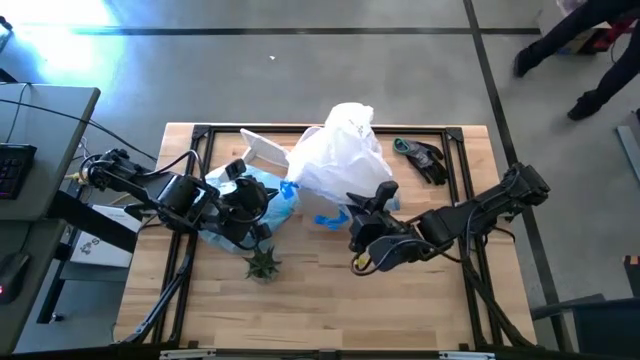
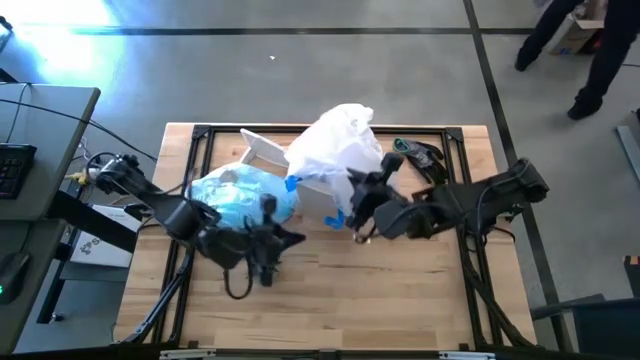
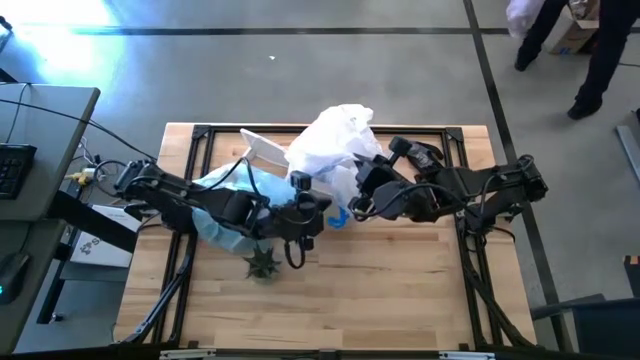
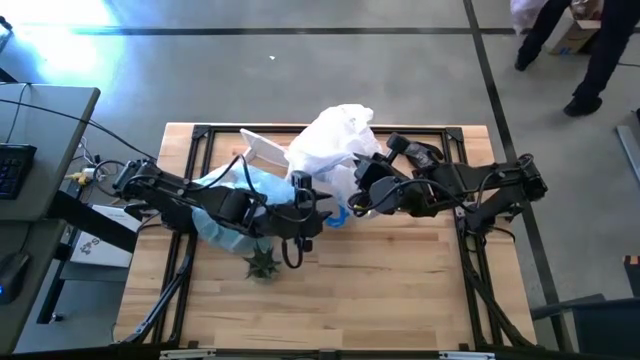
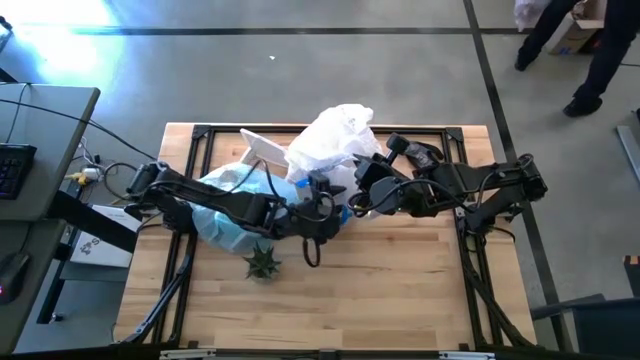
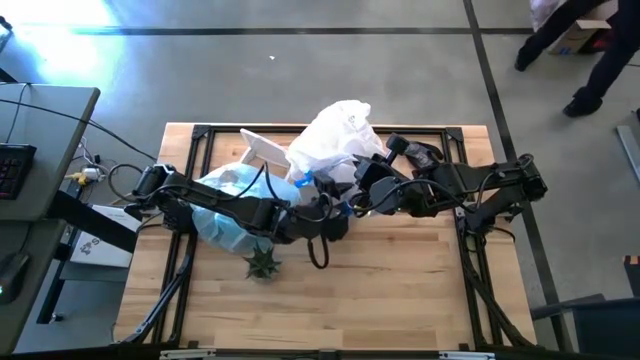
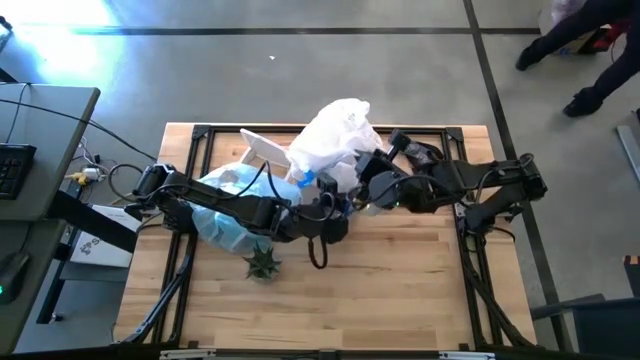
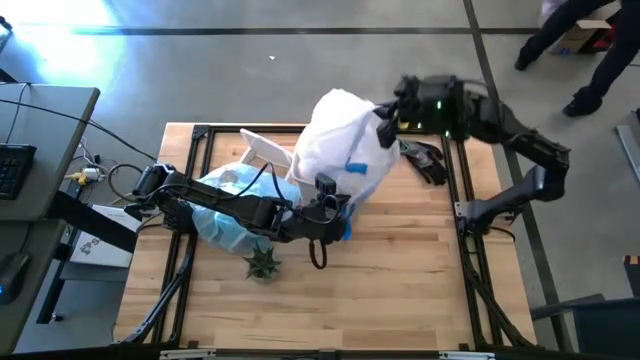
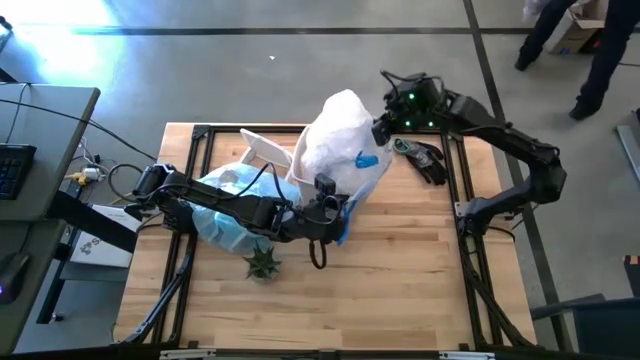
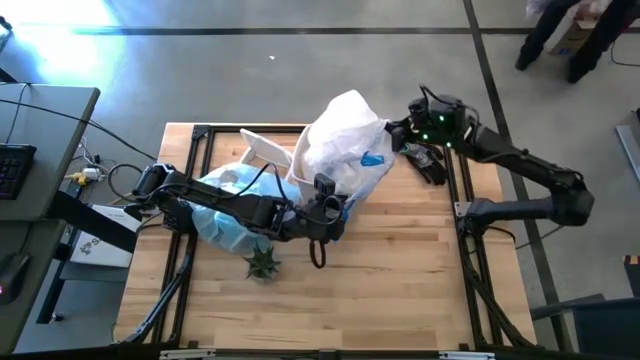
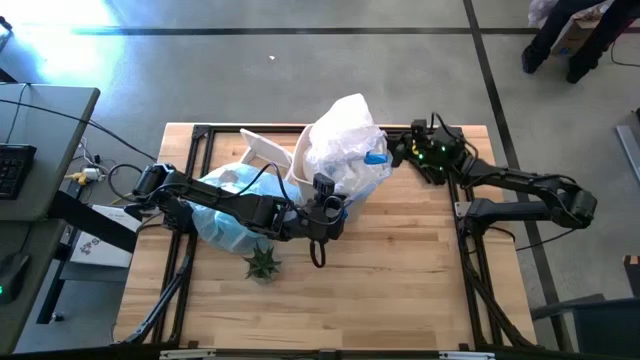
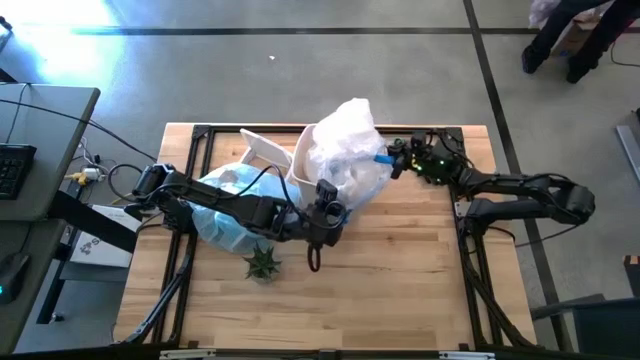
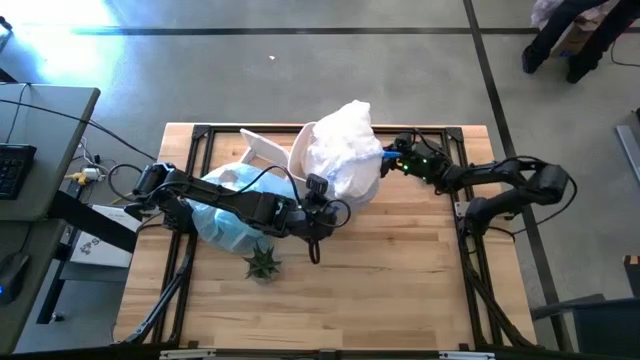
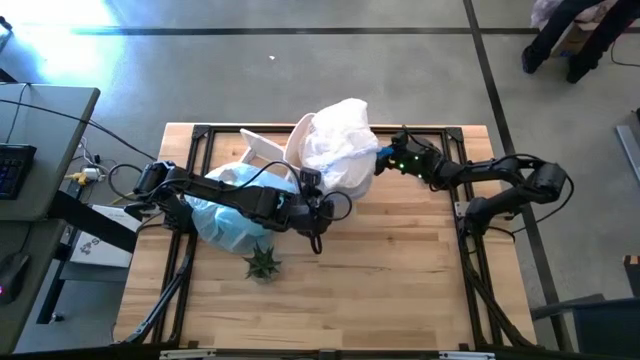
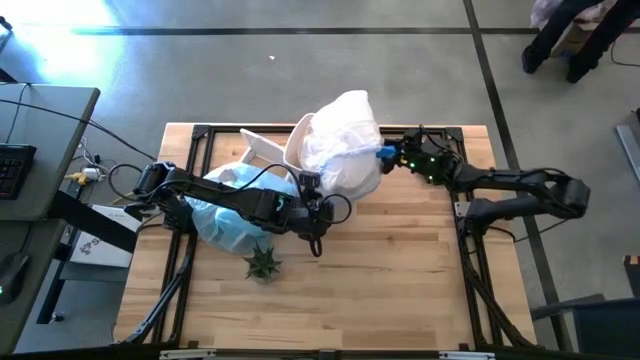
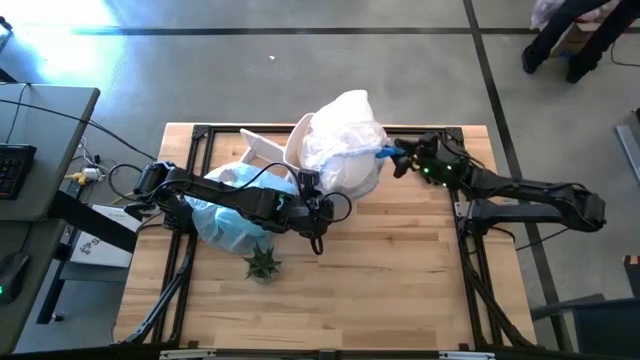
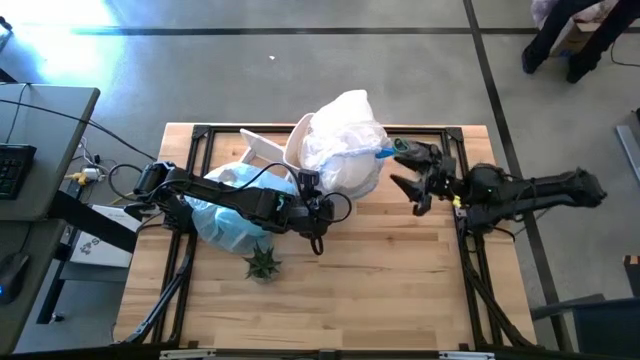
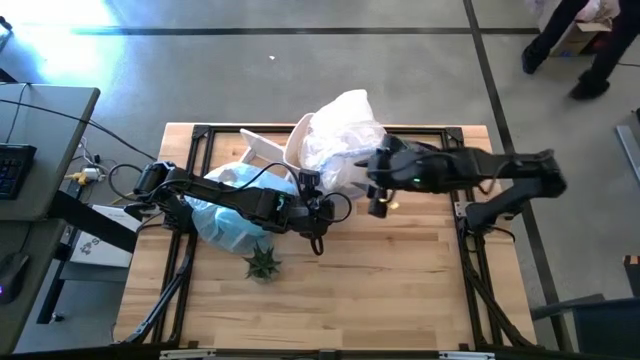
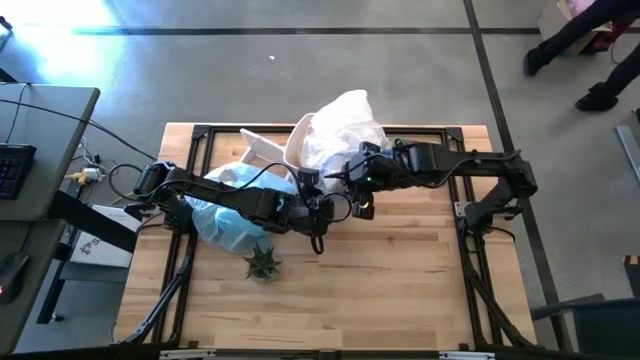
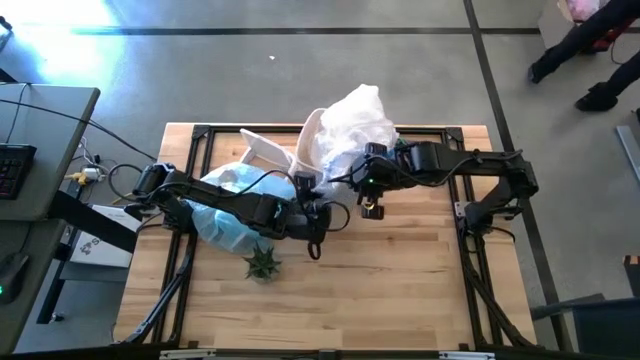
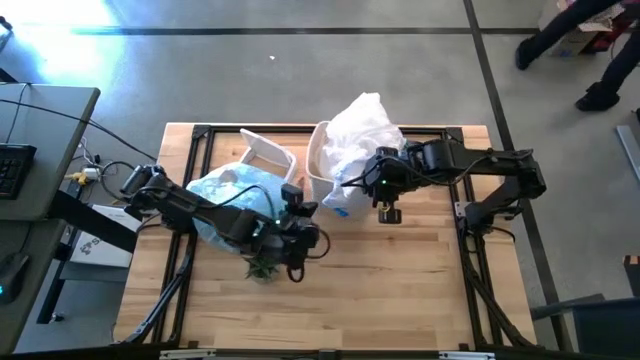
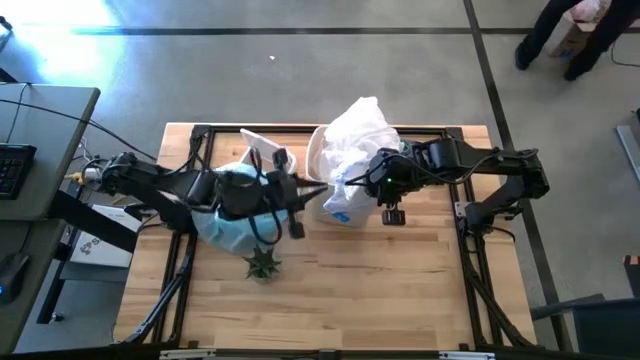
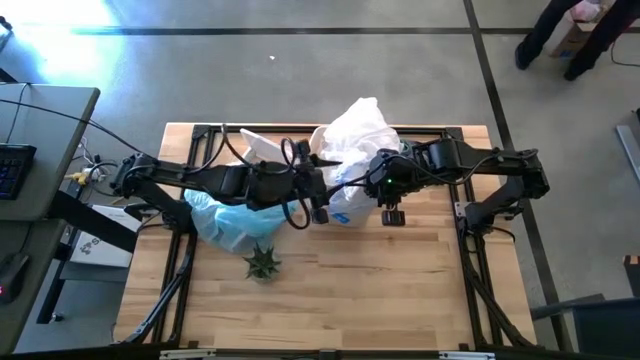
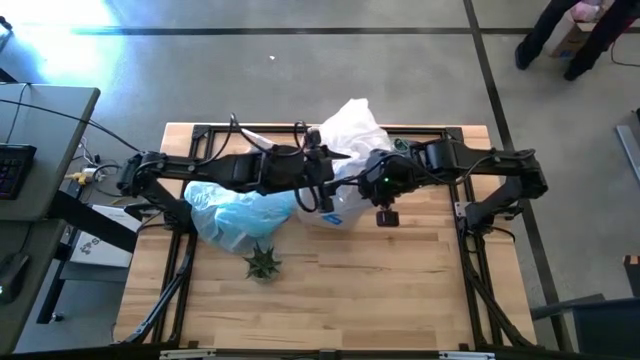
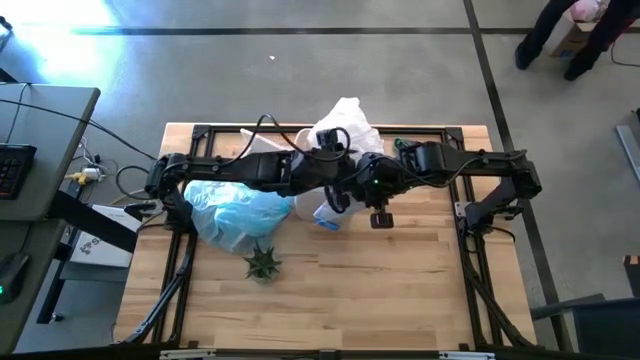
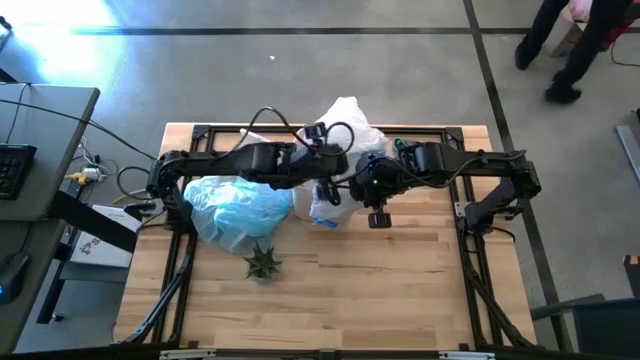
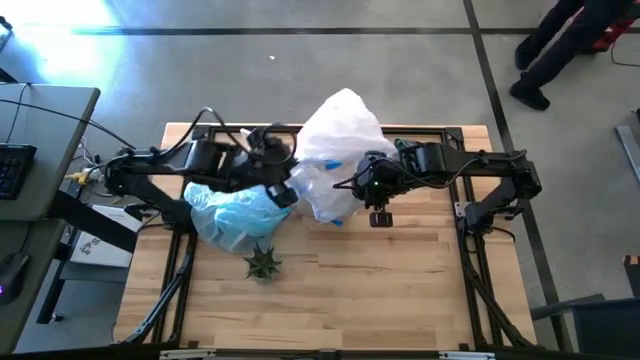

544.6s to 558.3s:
Task: place trash/remove bag and relplace
Insert the new trash bag into the trash bin

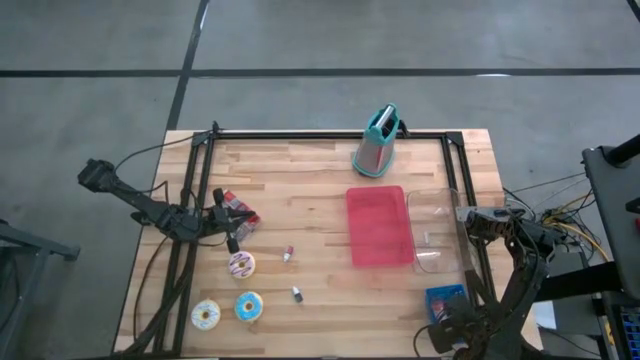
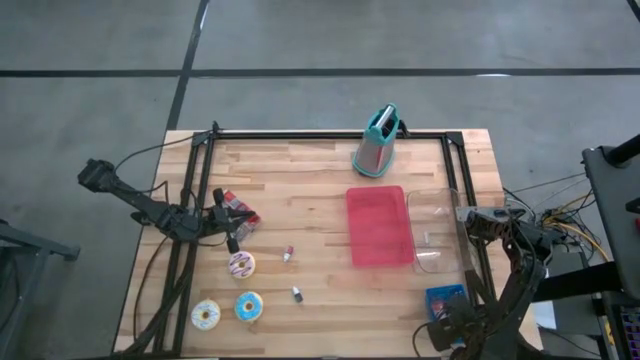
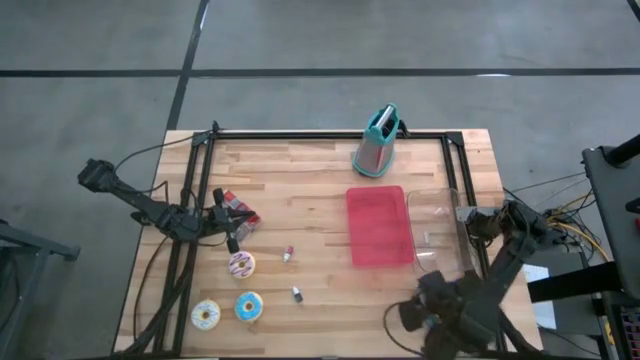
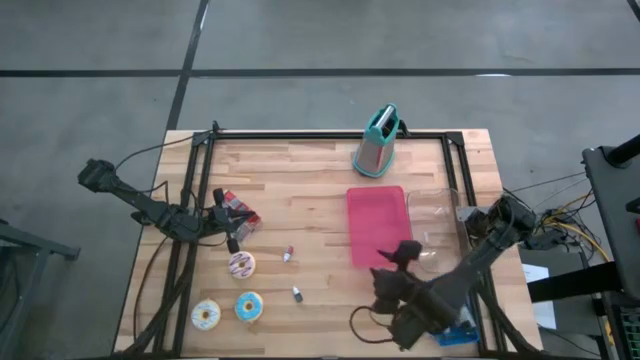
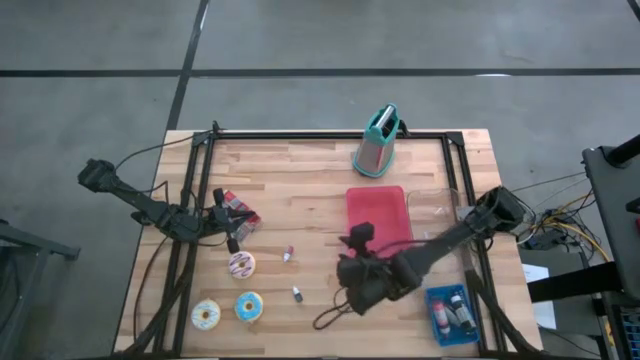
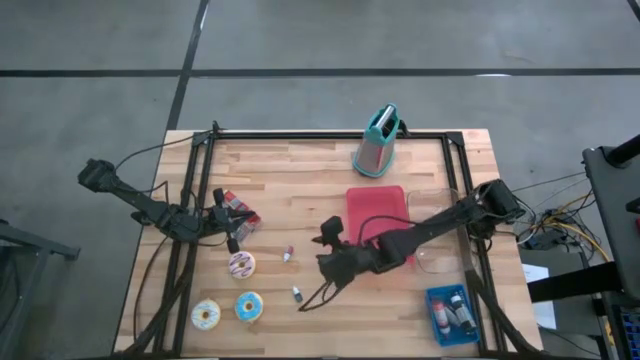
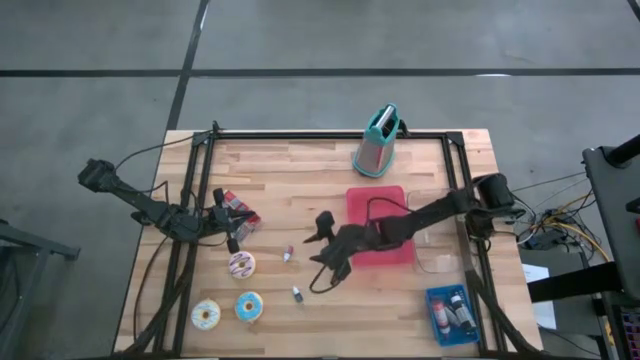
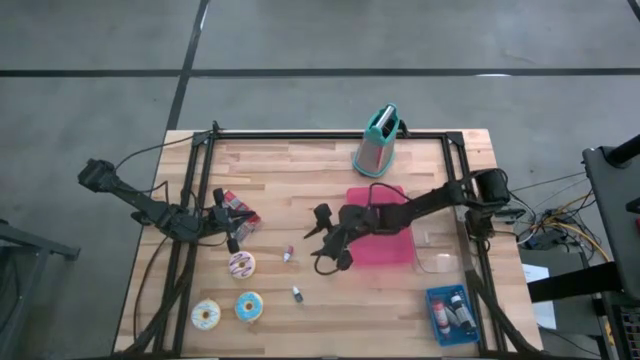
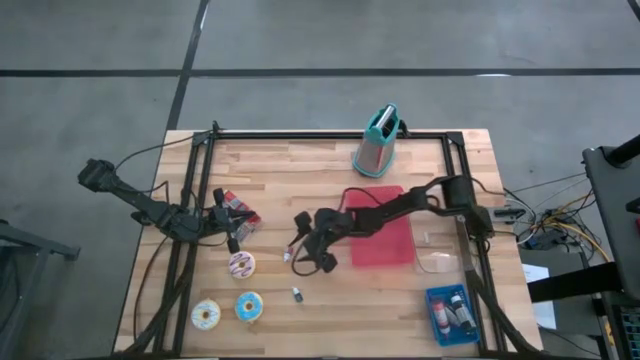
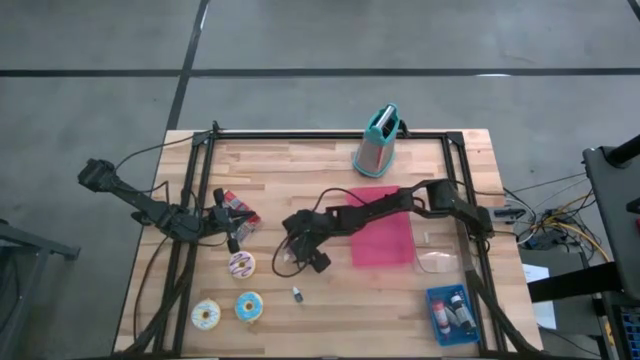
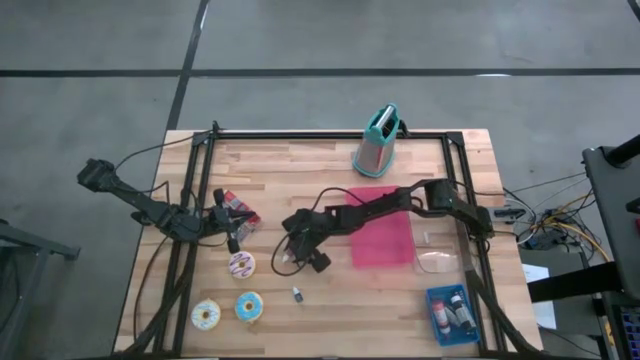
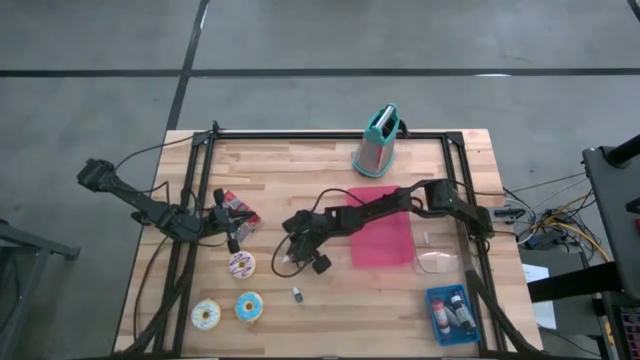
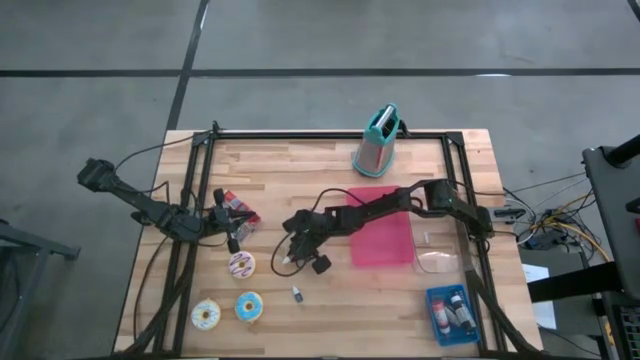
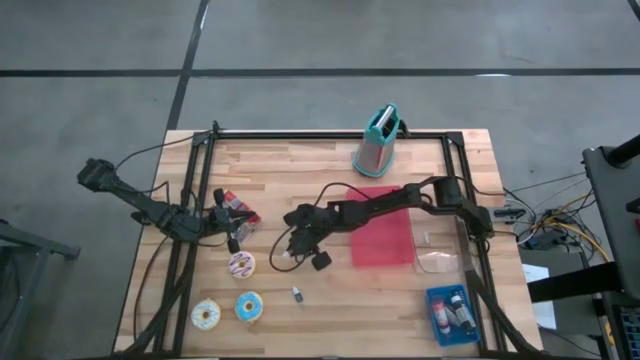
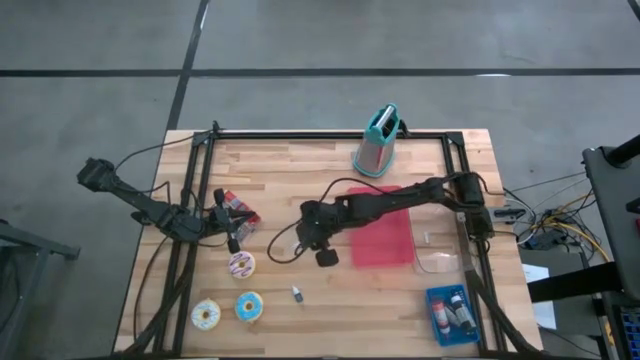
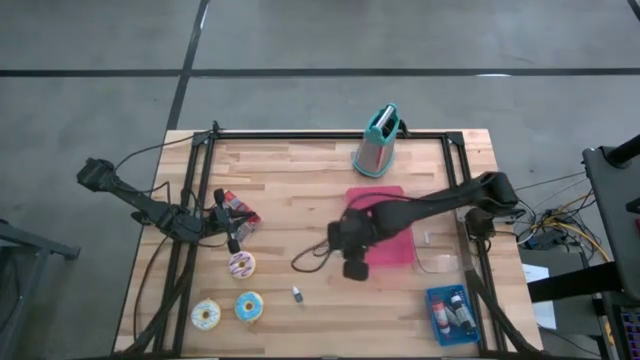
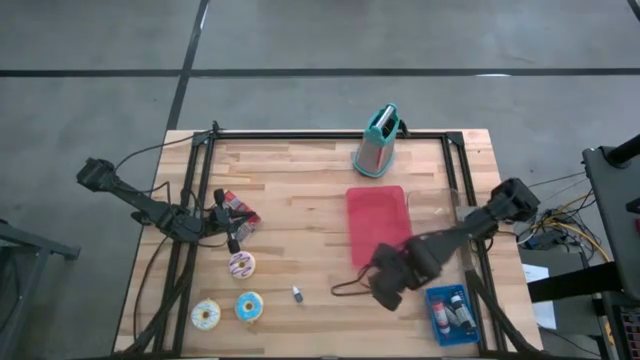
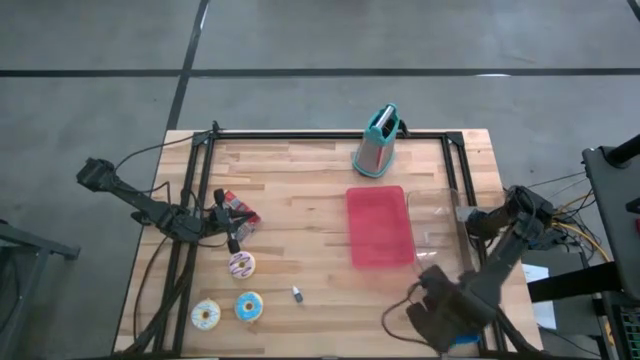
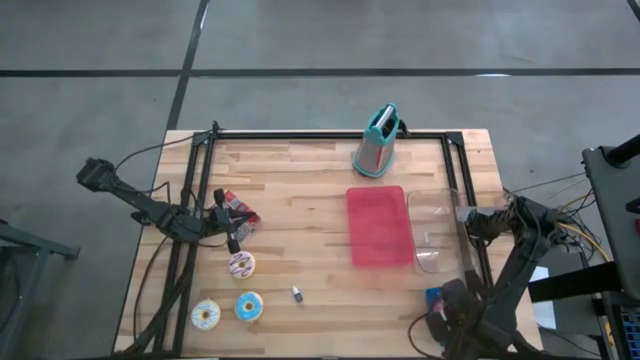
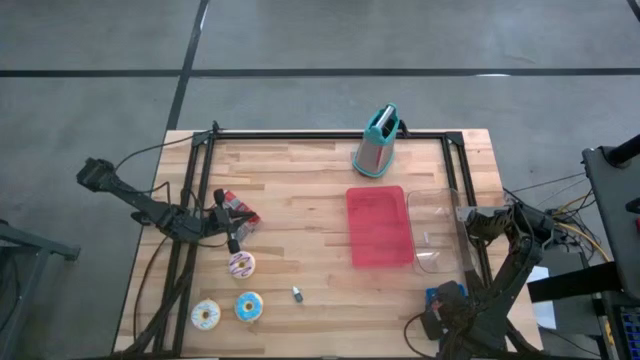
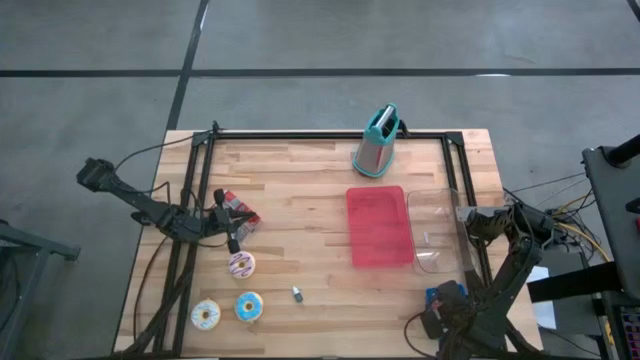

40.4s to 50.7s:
Task: Pick & Place Food Item
Put the red food coloring bottle into the blue bin
